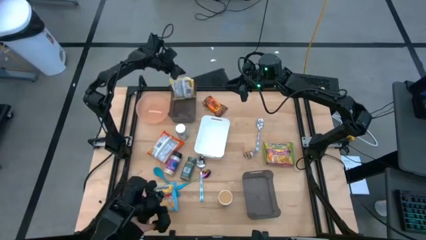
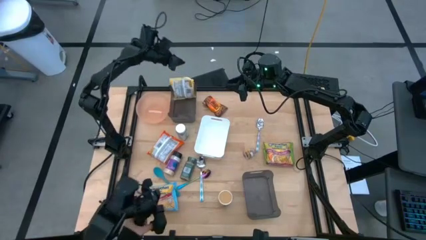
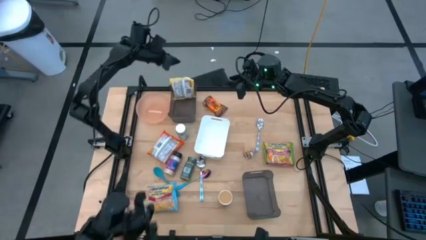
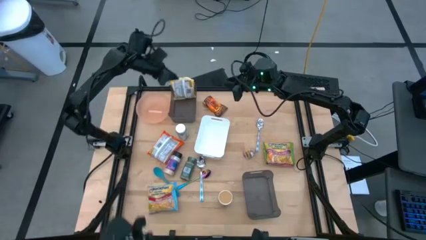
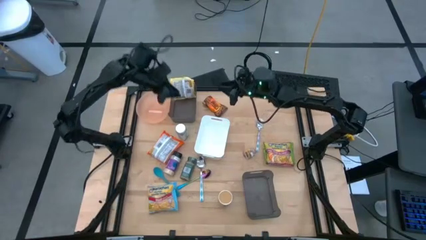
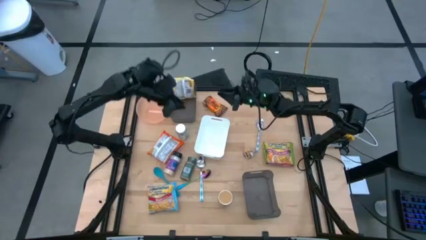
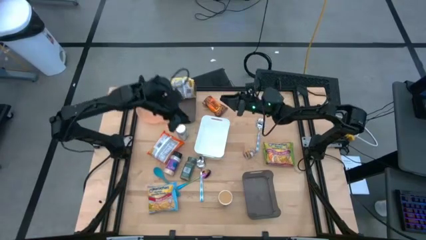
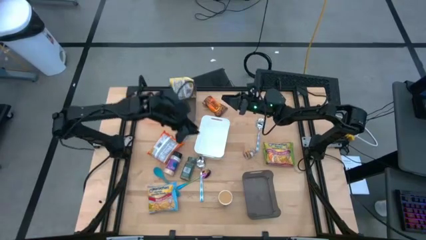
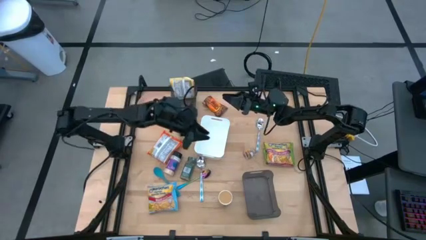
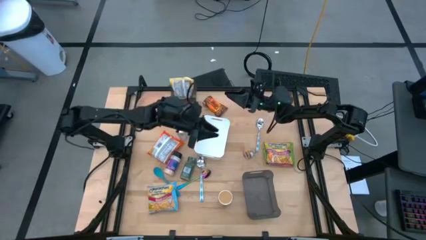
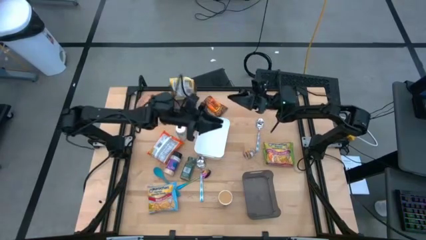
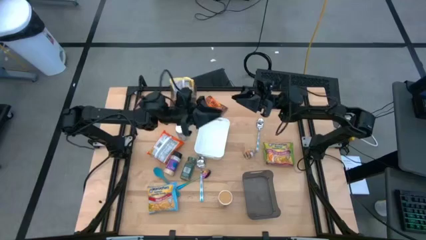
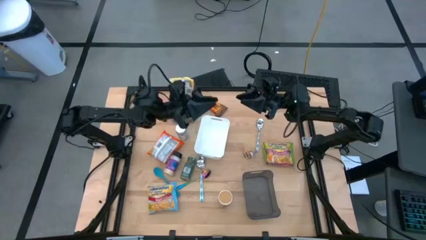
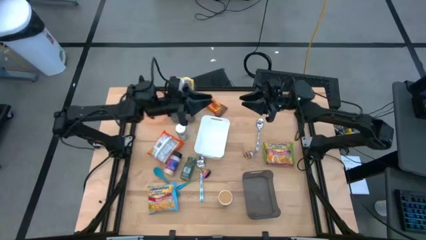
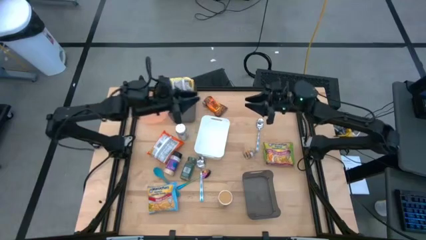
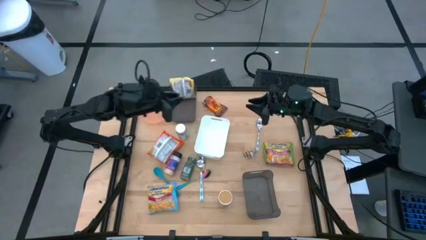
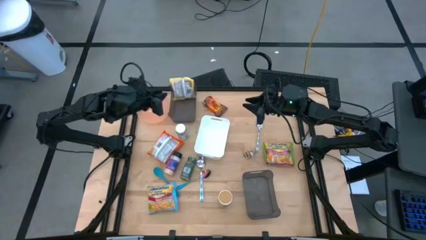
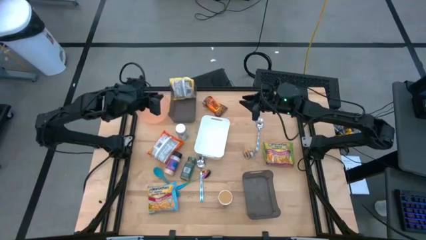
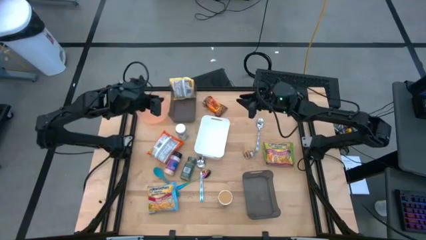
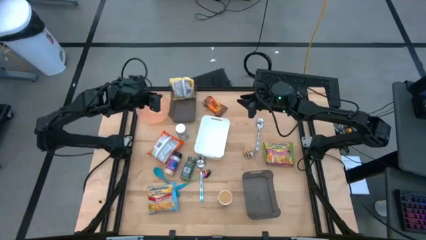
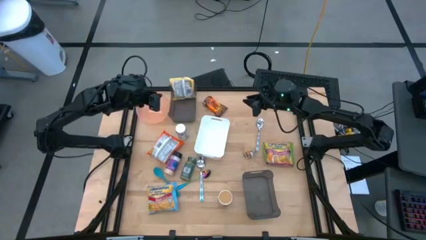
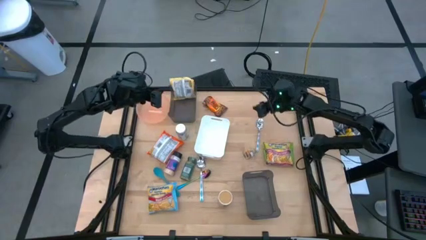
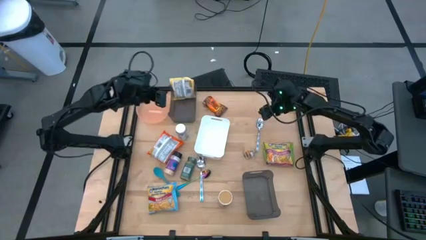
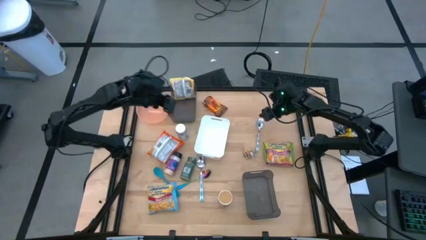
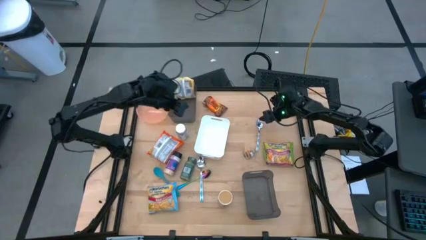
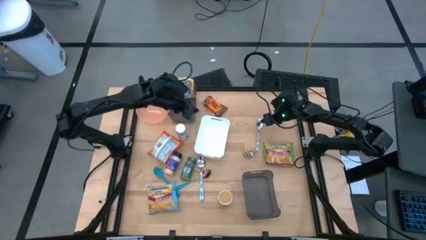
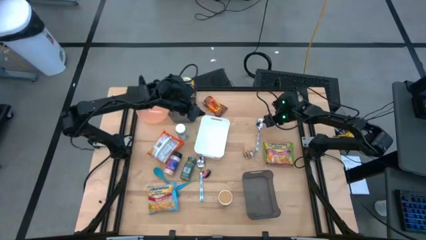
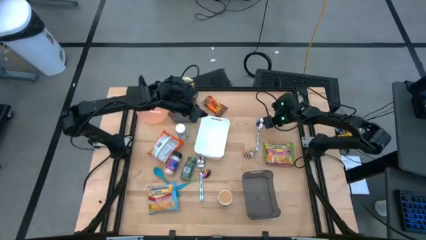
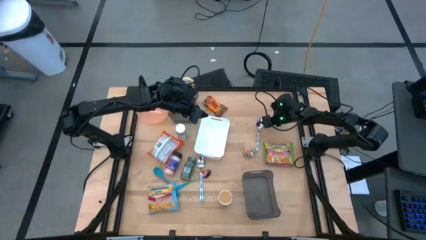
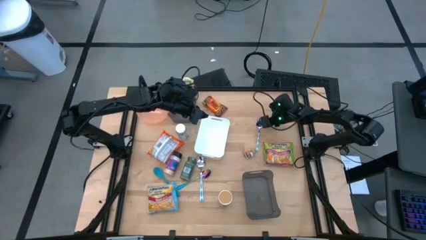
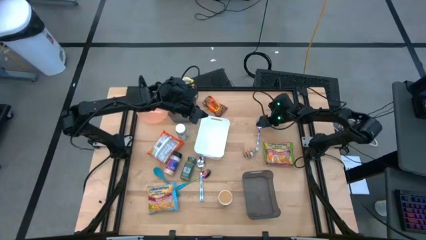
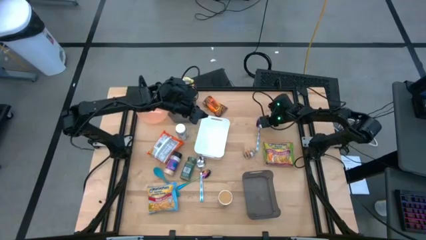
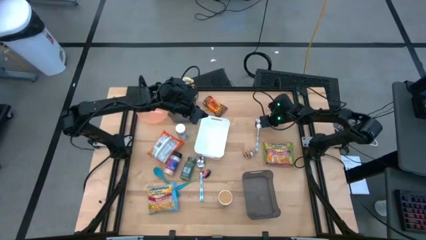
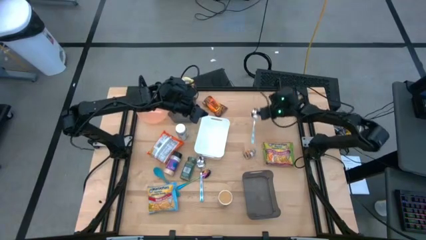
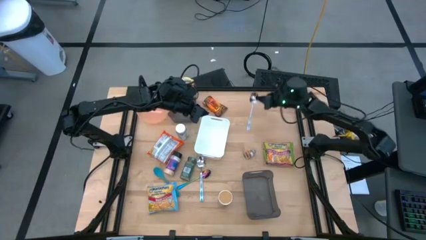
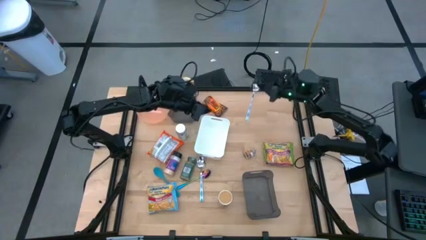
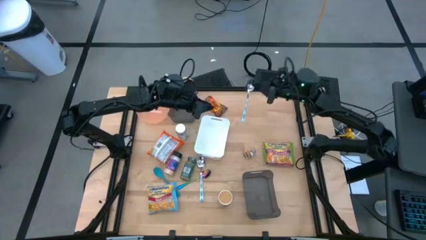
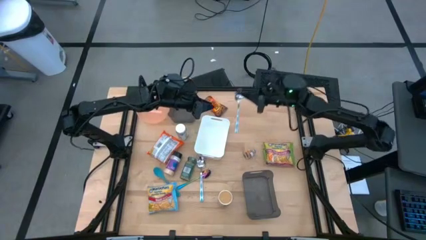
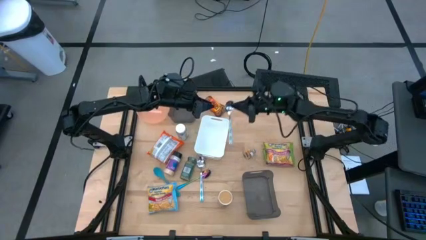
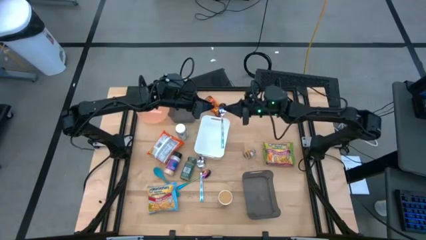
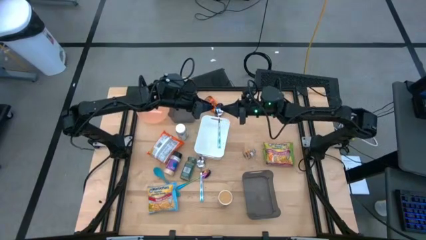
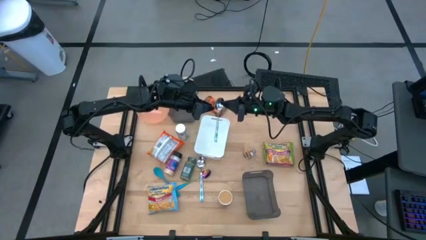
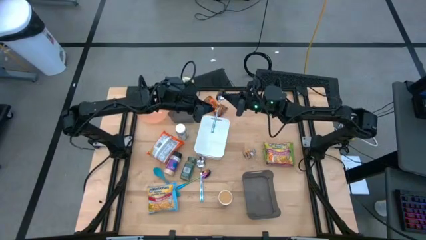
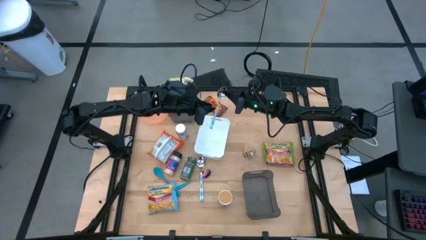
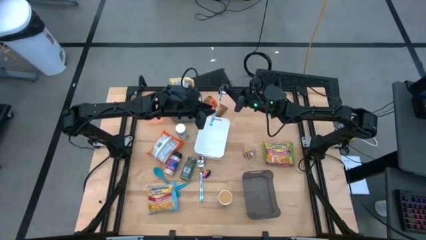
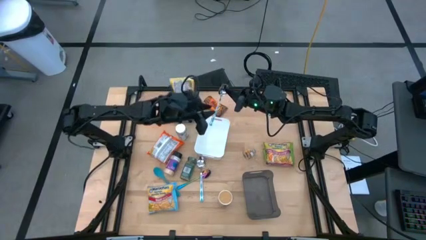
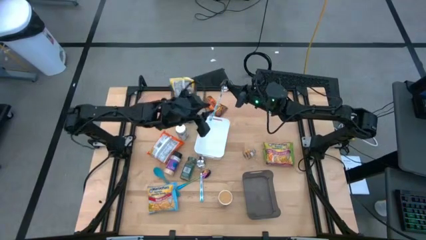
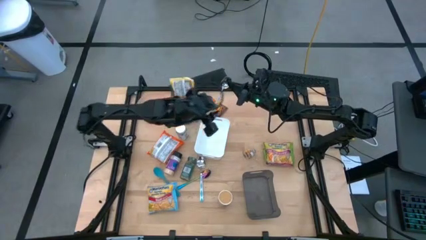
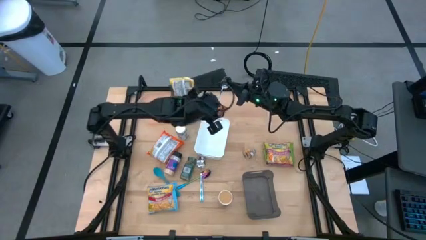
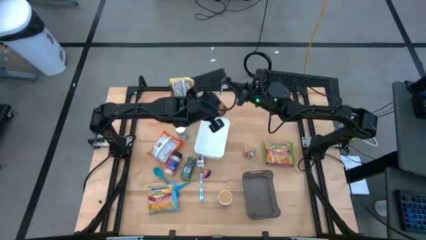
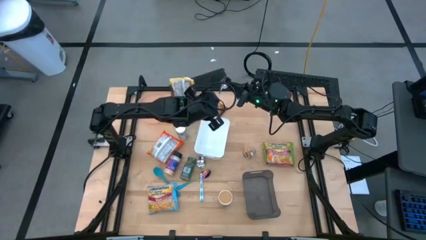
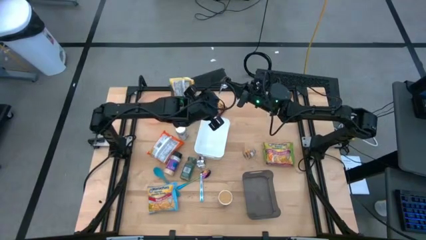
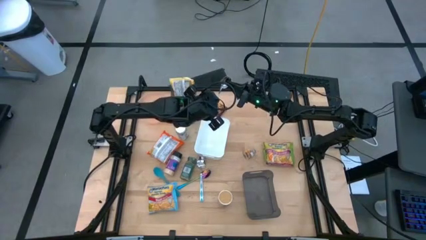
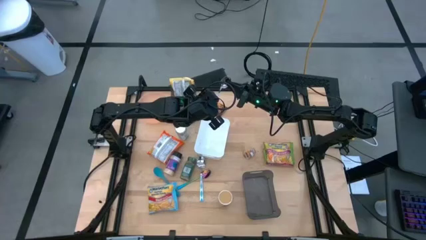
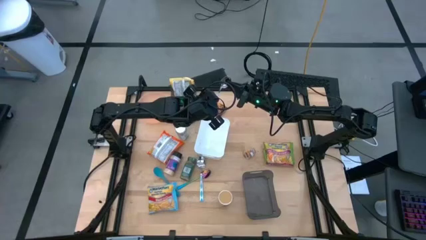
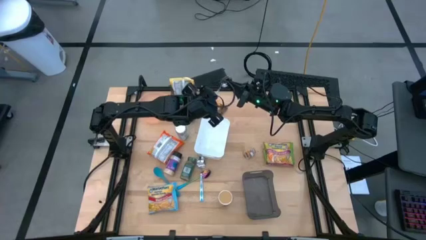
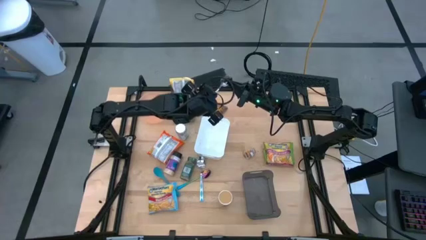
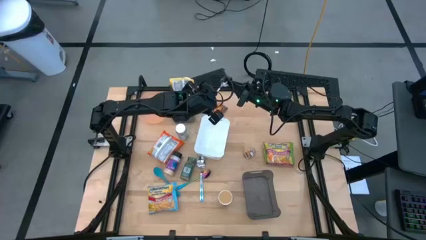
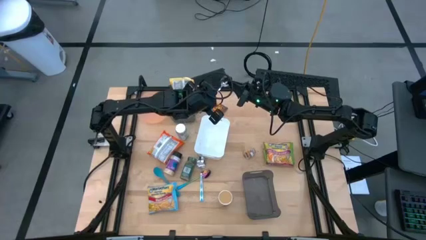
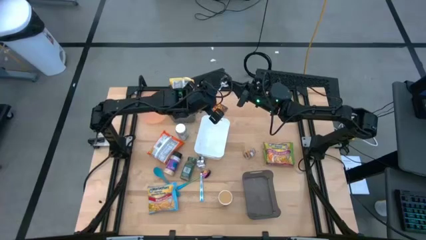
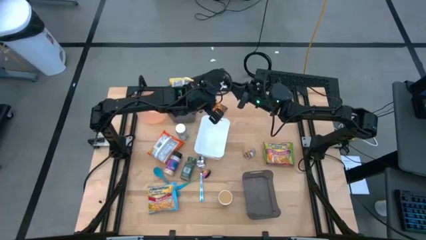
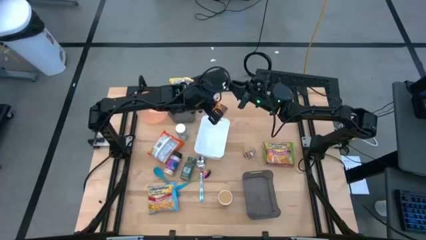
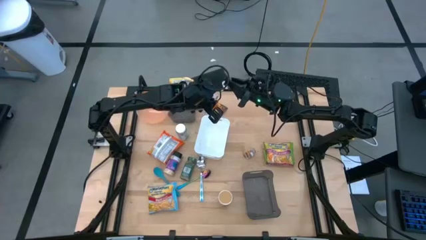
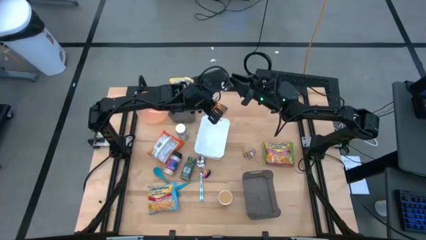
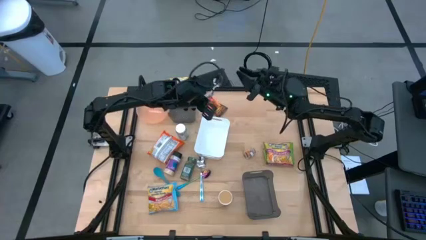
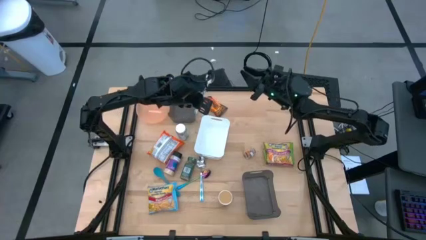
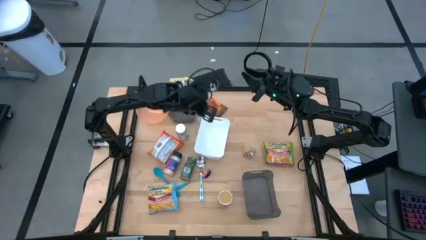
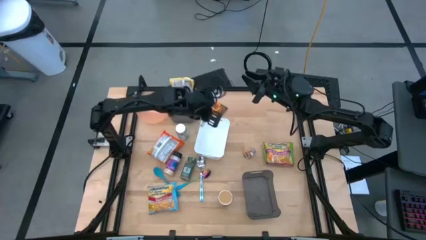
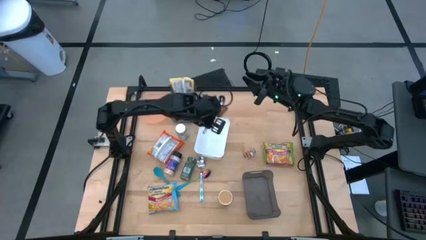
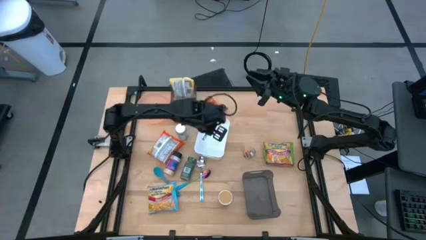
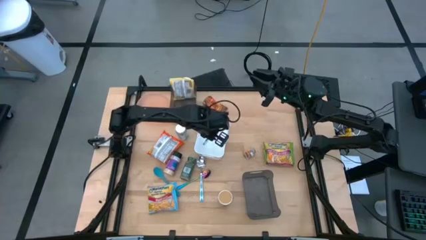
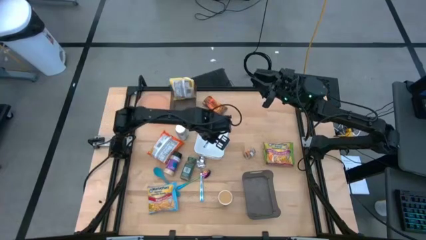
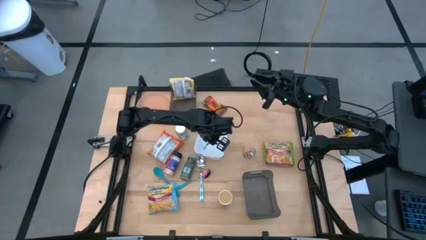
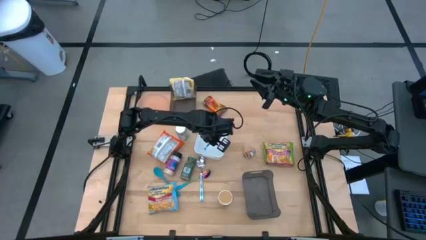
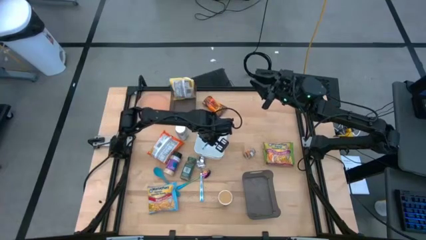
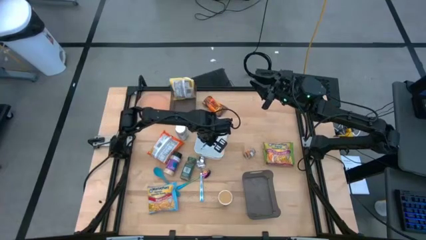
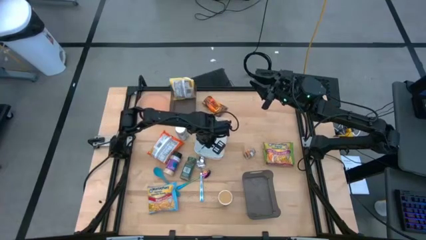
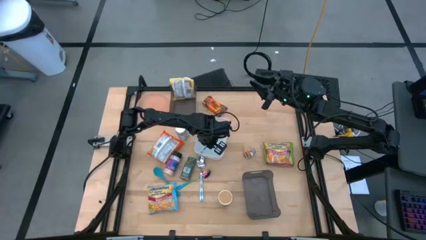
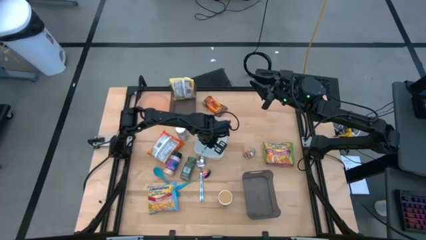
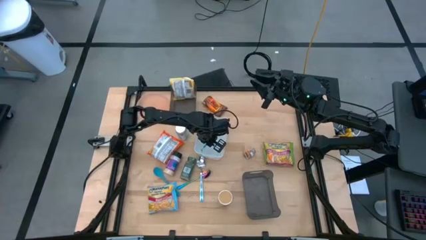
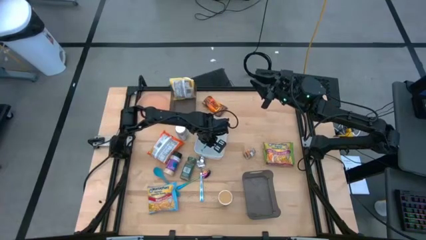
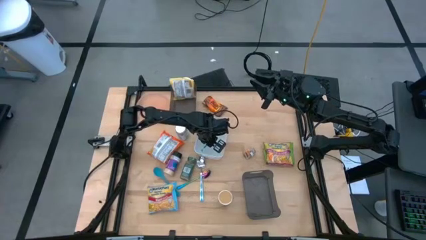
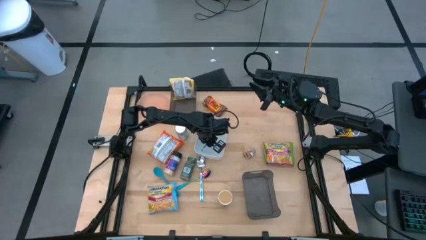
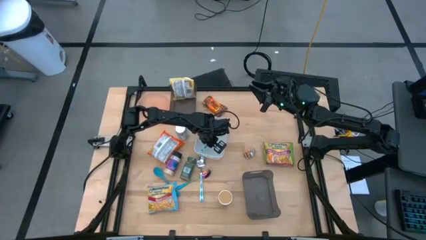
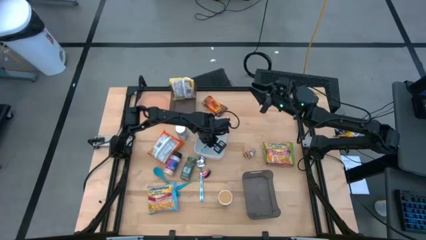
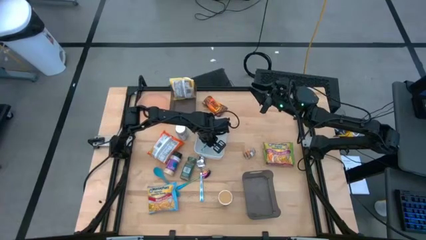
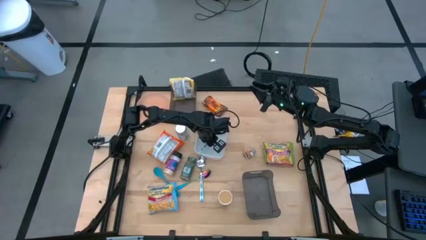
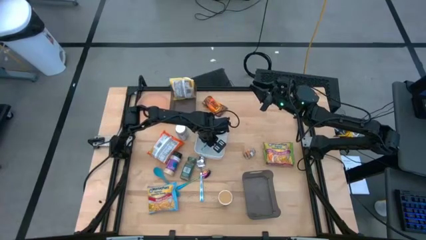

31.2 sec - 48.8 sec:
Task: Pick & Place Food Item
Put the top white patterned spoon into the white bin
